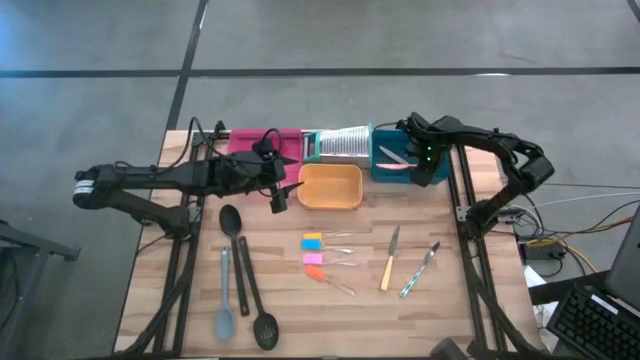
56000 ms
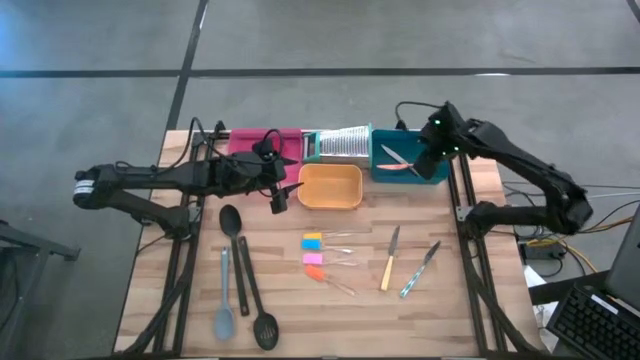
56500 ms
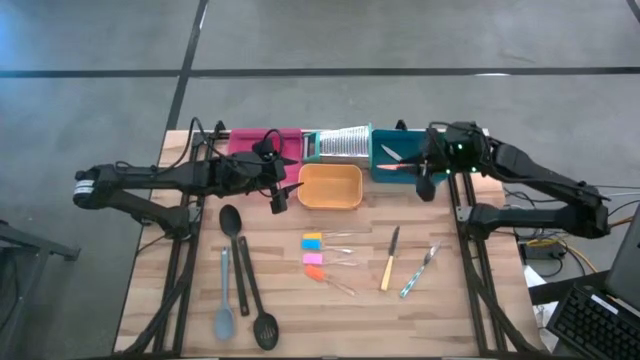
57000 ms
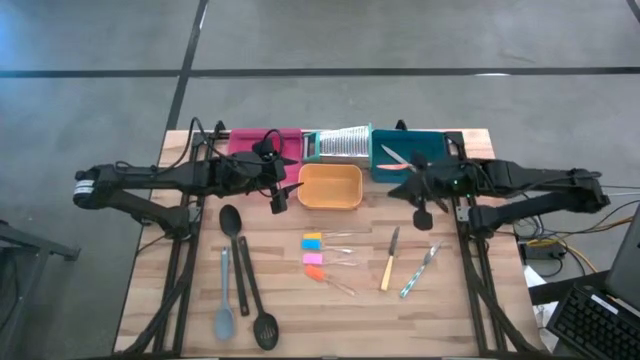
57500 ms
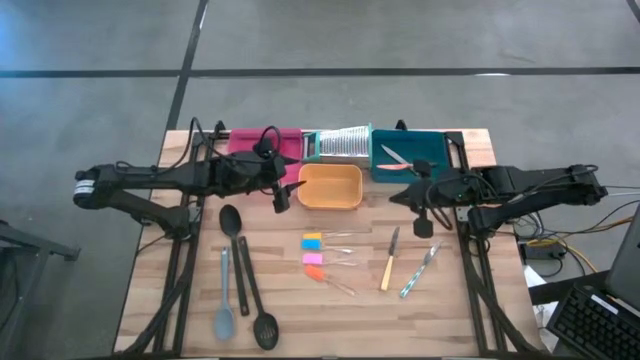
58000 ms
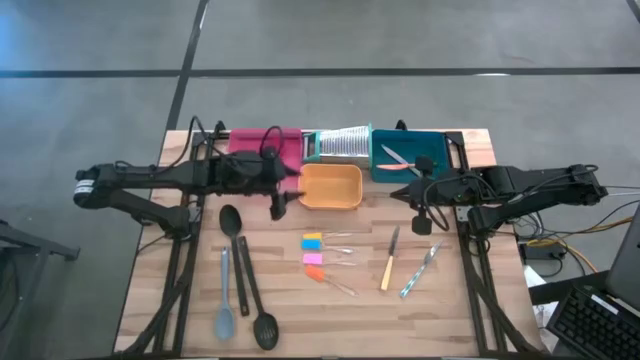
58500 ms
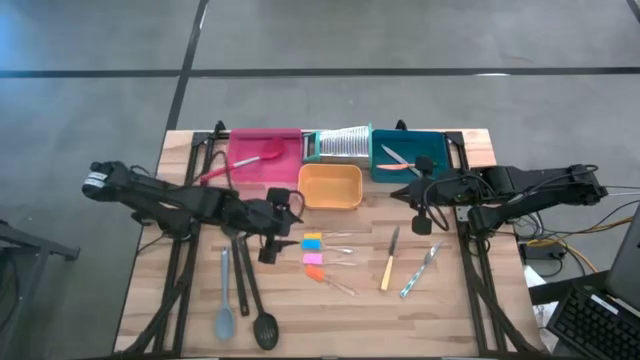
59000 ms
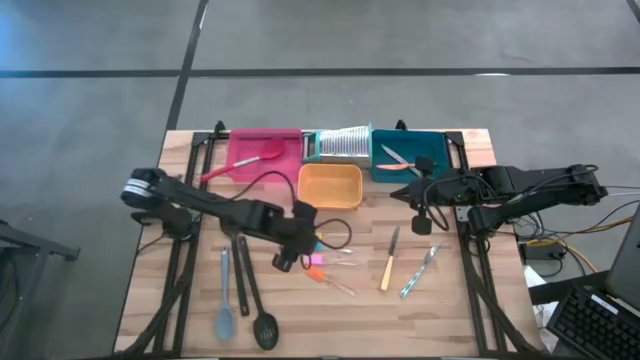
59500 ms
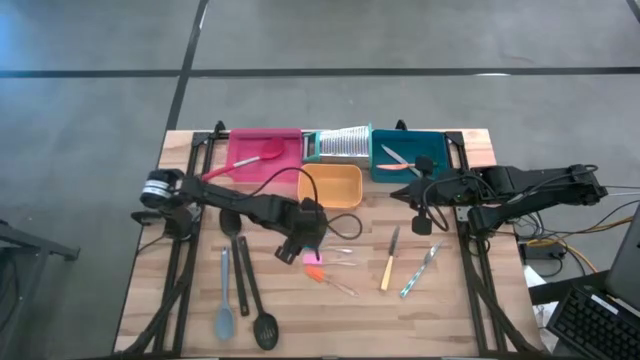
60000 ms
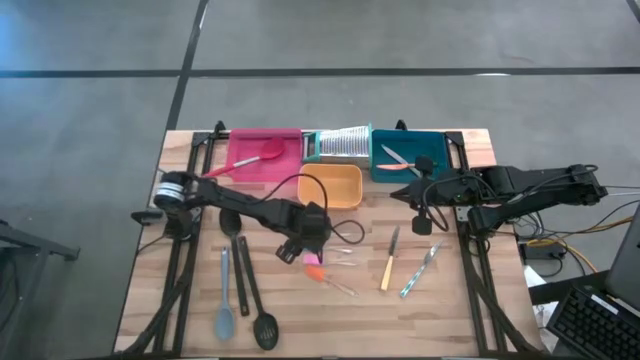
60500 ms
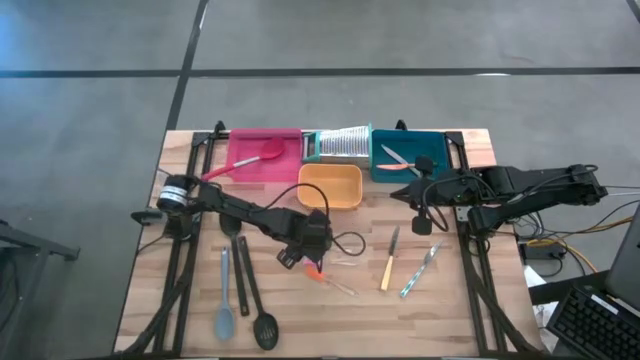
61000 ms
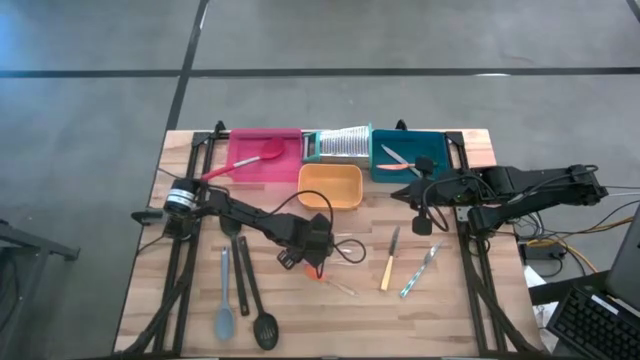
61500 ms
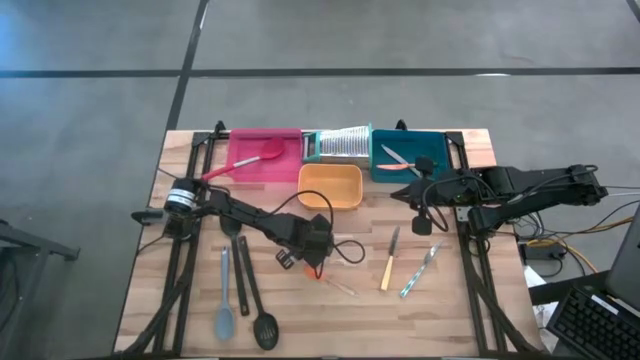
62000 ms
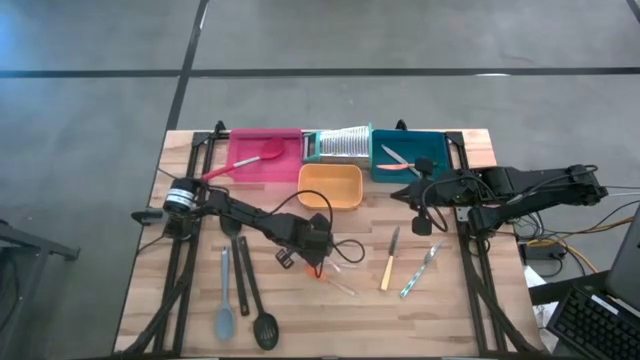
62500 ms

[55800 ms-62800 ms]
Task: Pick & Place Kitchen Items
Put the blue spatula into the yellow bin

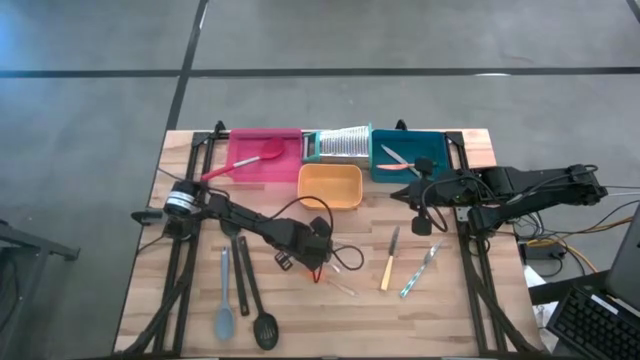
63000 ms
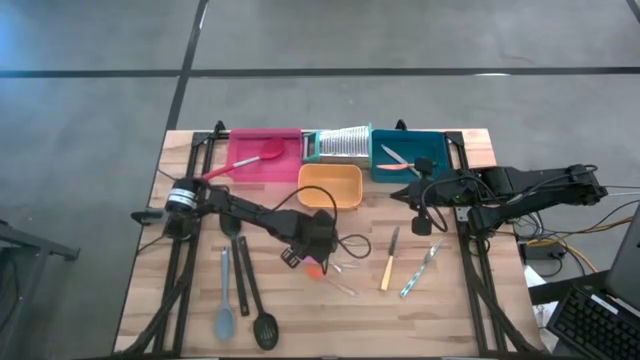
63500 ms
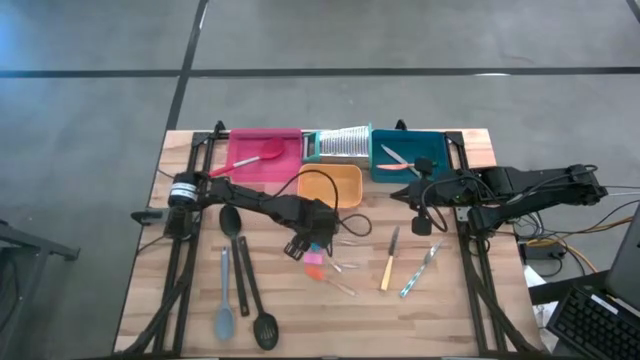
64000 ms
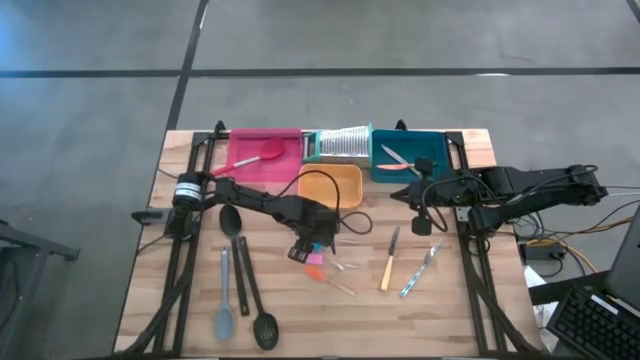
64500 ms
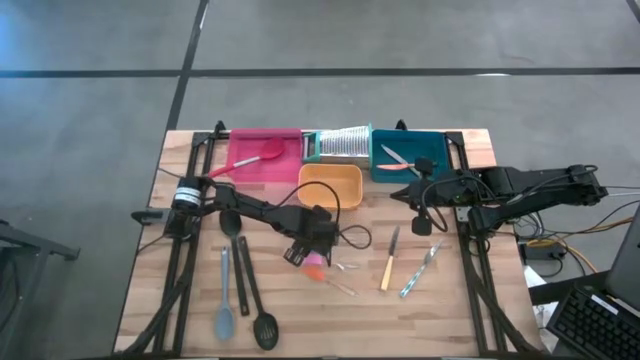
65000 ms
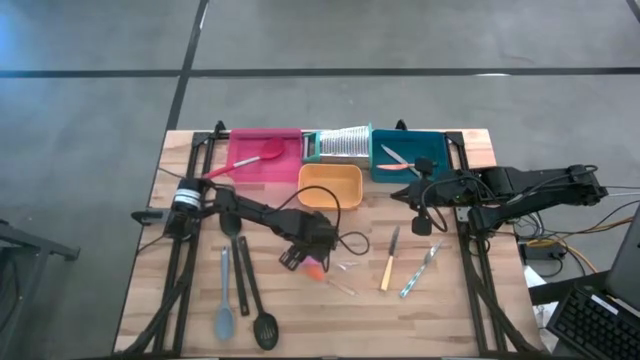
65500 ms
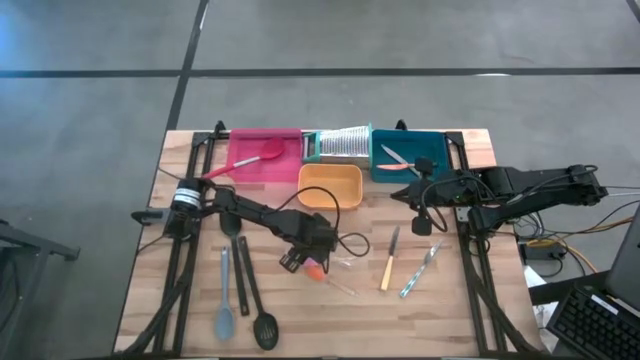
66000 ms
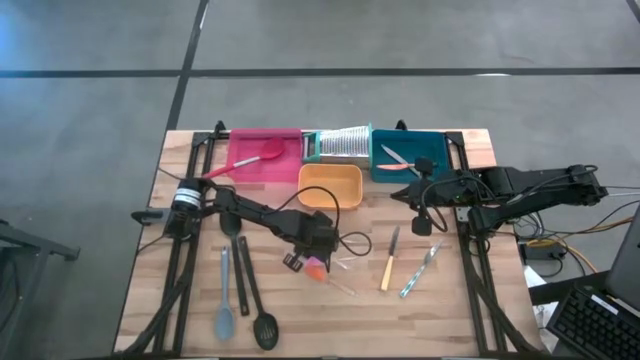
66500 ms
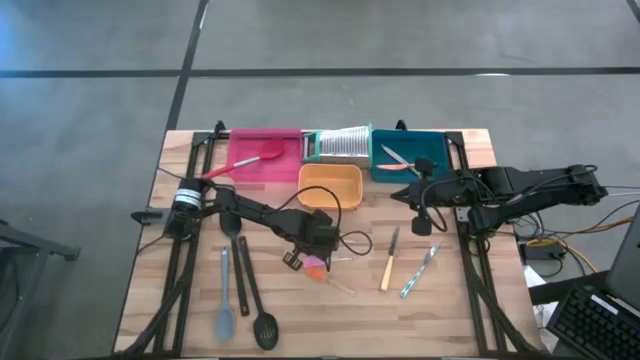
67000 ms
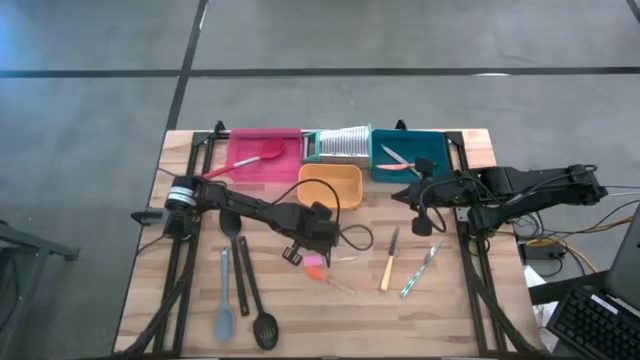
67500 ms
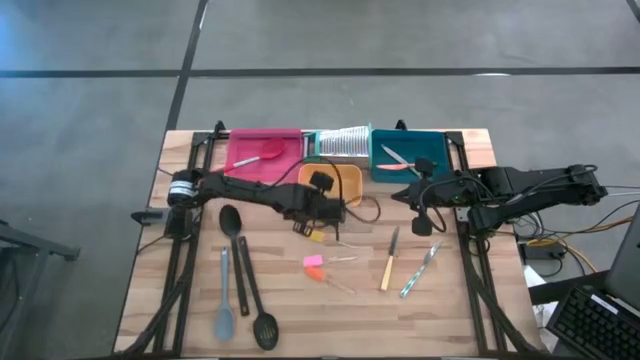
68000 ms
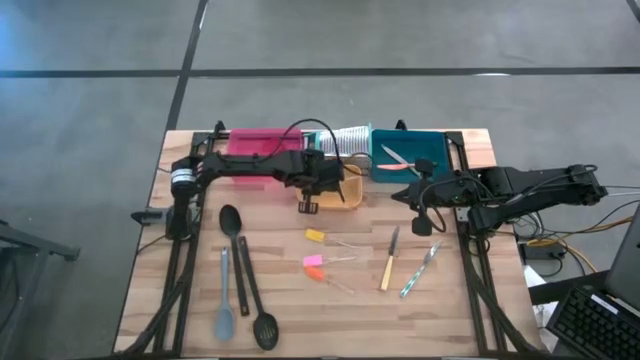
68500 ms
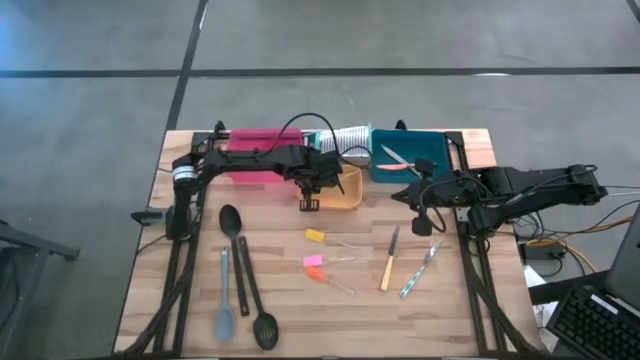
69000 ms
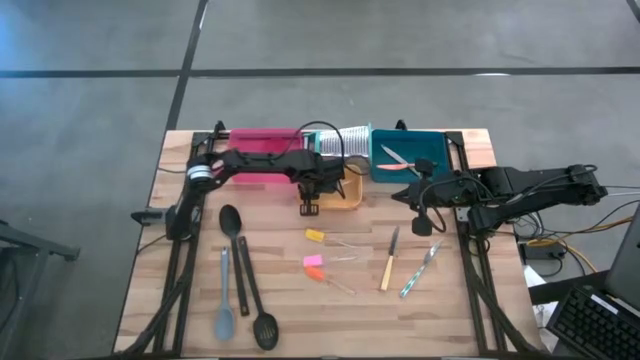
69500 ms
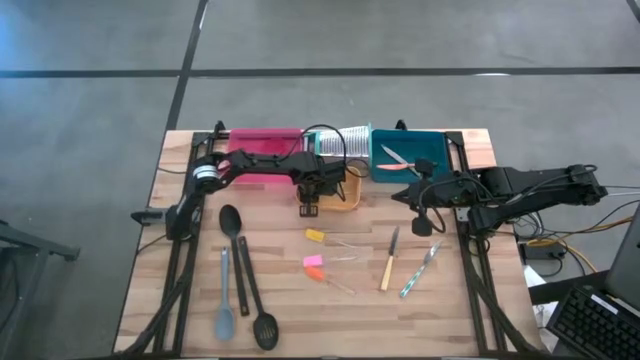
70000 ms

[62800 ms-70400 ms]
Put the blue spatula into the yellow bin

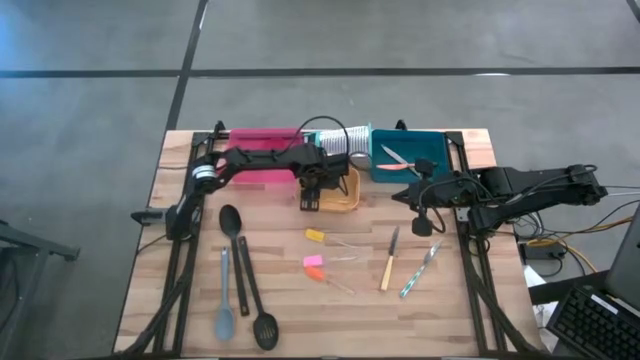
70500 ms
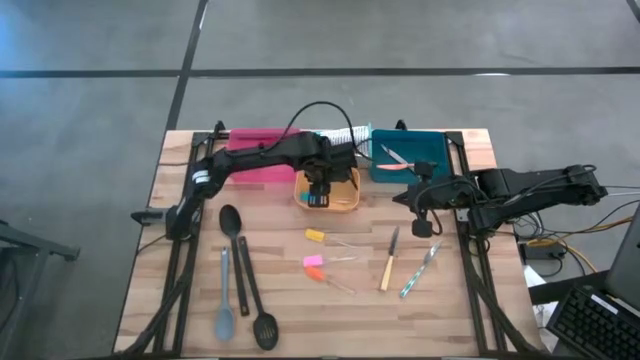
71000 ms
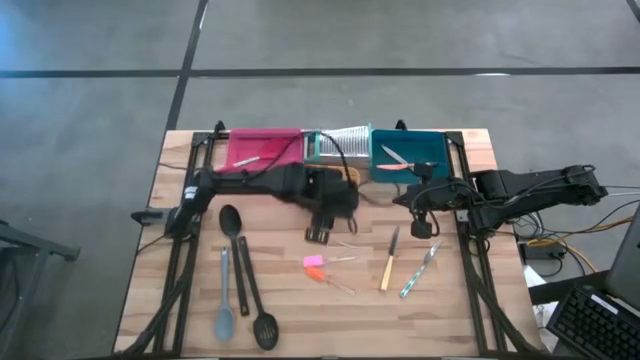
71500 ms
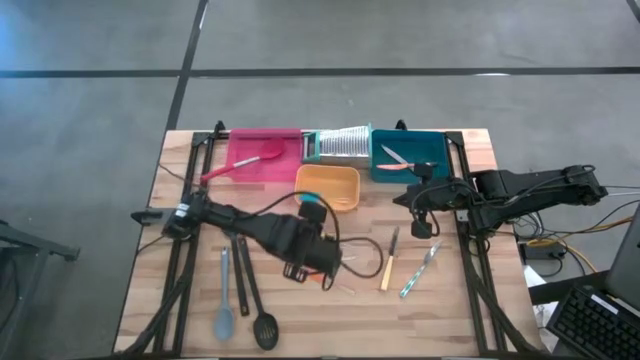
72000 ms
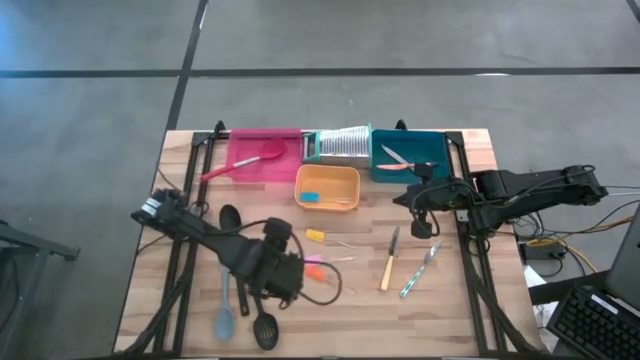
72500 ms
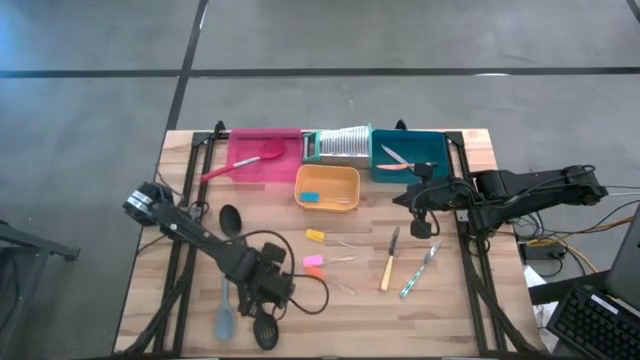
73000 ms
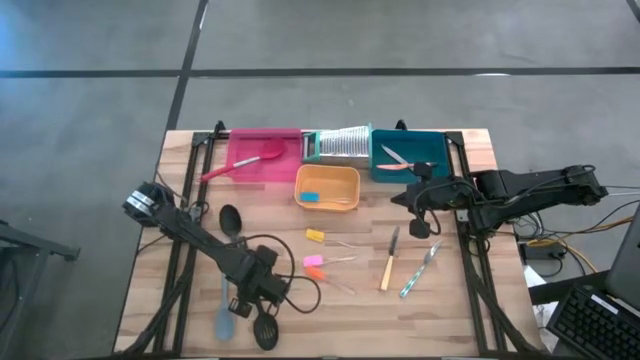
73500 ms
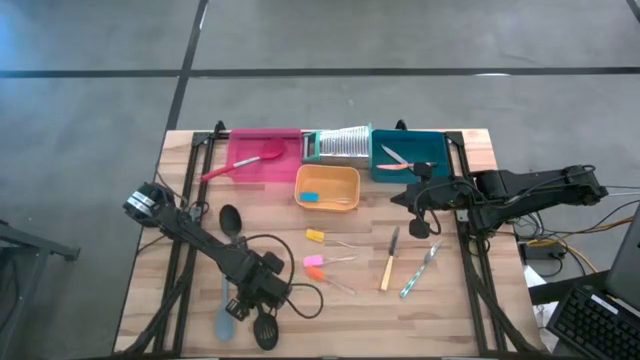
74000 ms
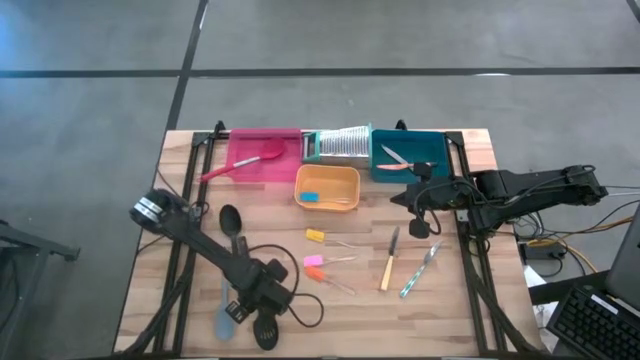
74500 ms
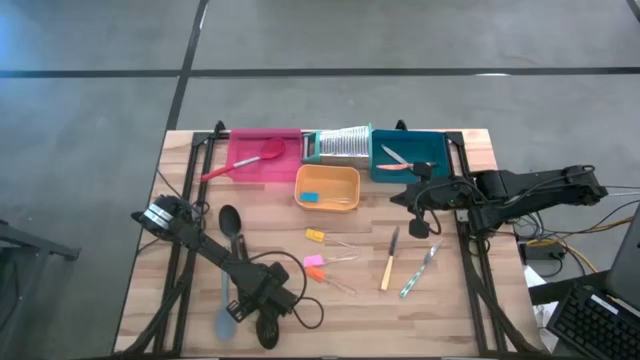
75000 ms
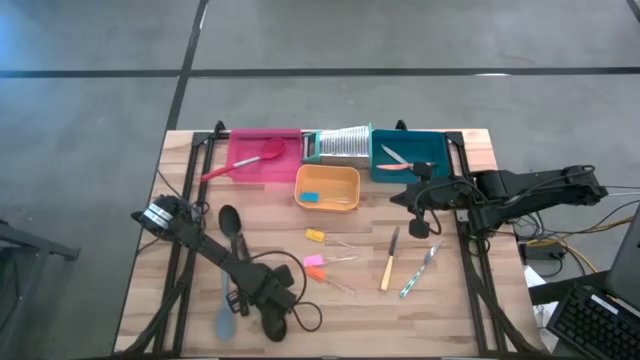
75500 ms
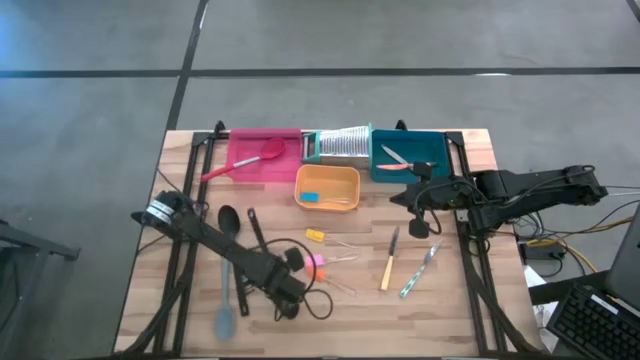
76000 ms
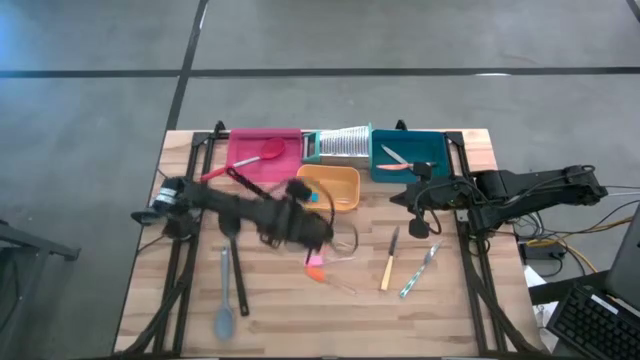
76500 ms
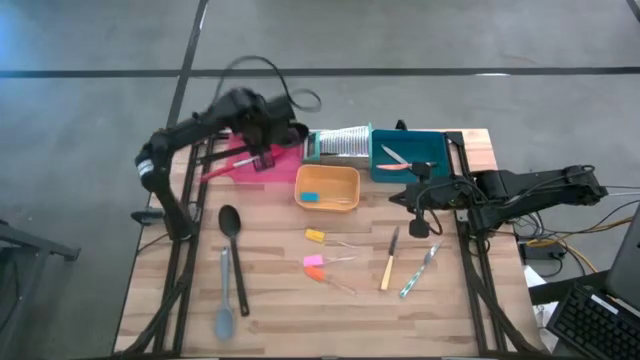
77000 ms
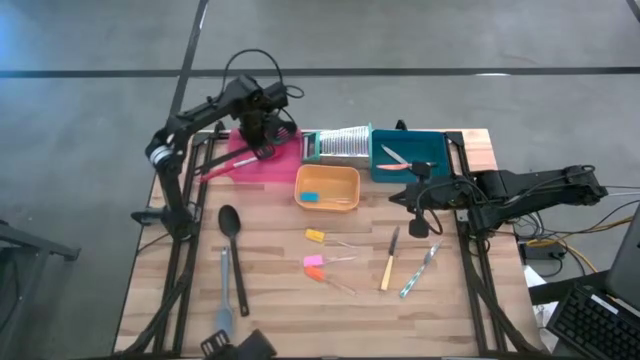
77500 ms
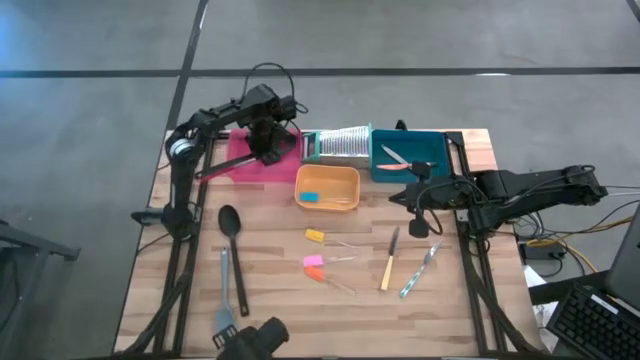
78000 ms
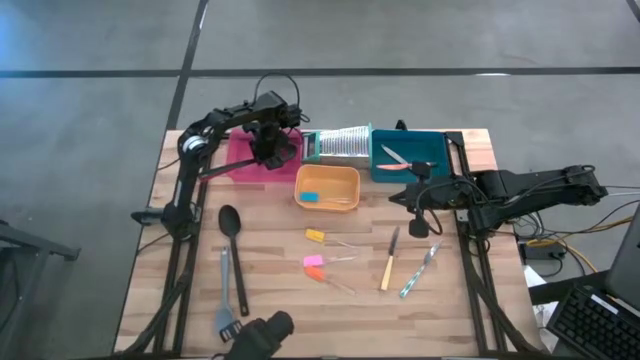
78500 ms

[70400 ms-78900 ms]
Put the right black spoon into the pink bin
